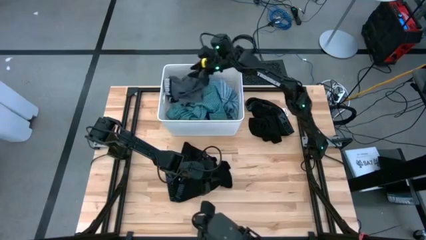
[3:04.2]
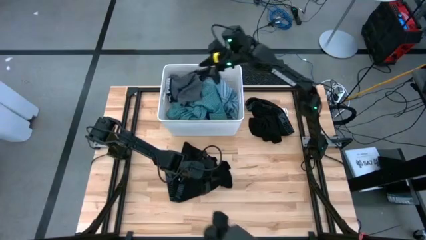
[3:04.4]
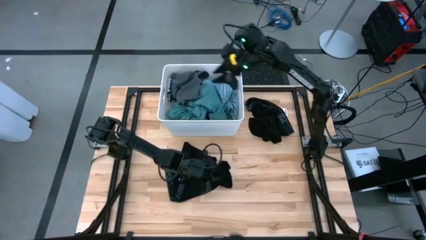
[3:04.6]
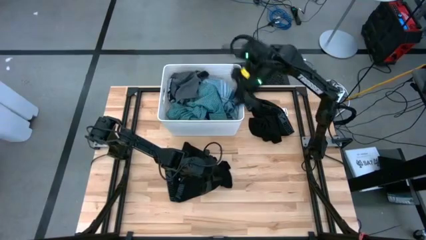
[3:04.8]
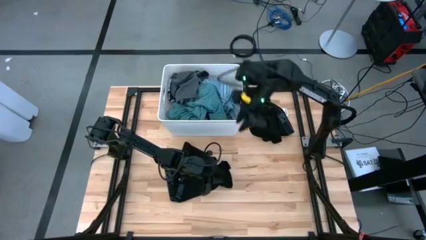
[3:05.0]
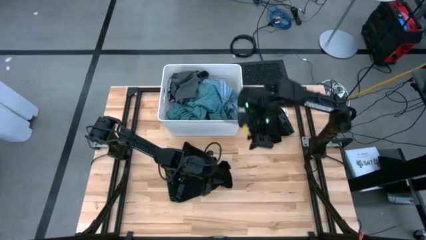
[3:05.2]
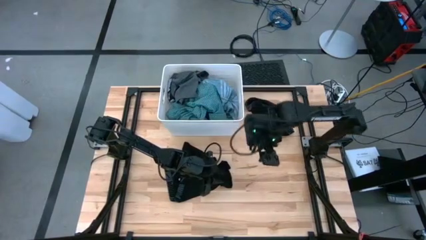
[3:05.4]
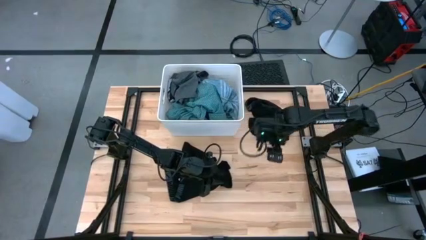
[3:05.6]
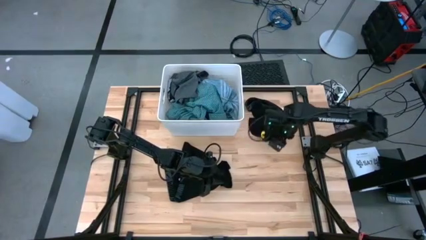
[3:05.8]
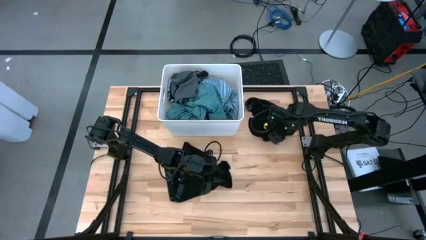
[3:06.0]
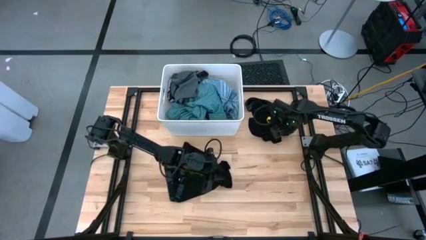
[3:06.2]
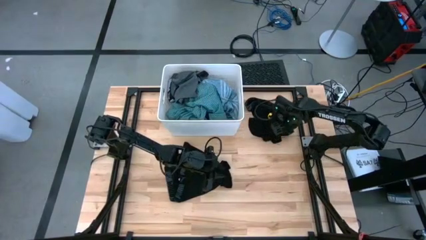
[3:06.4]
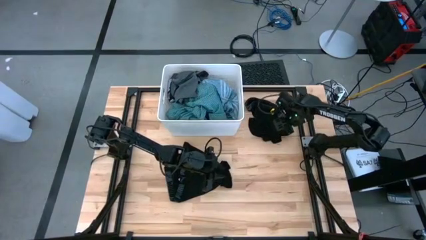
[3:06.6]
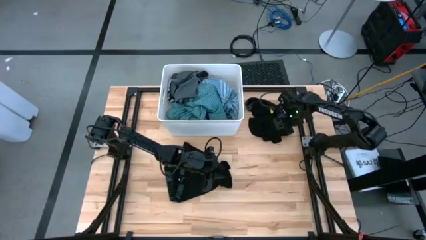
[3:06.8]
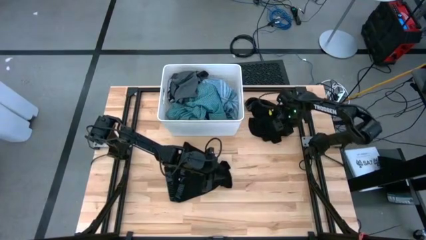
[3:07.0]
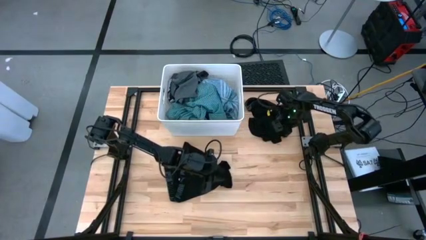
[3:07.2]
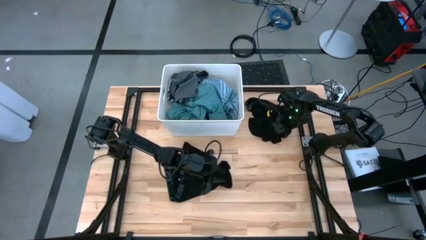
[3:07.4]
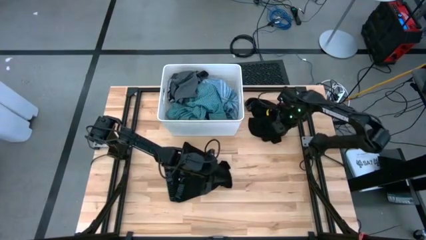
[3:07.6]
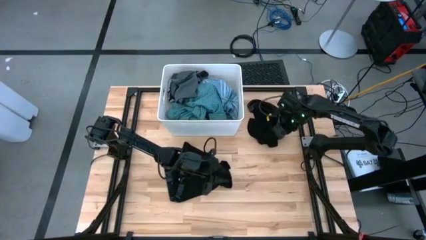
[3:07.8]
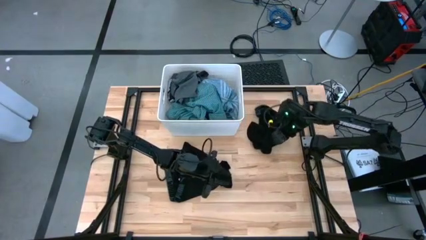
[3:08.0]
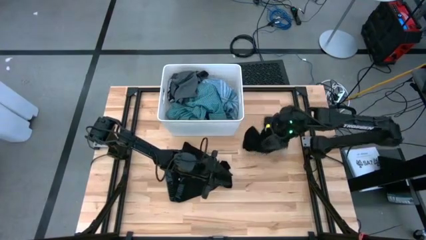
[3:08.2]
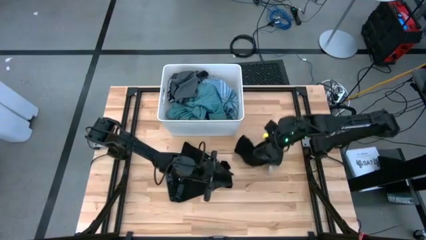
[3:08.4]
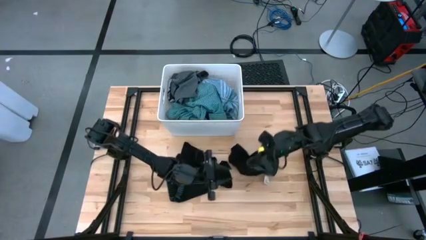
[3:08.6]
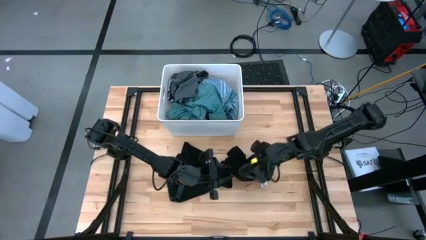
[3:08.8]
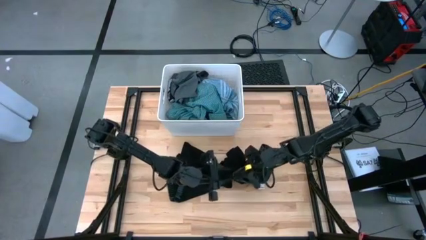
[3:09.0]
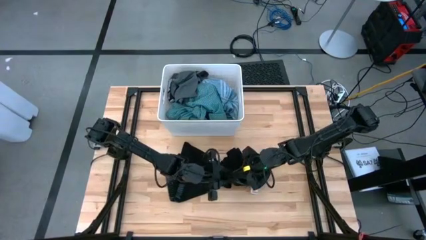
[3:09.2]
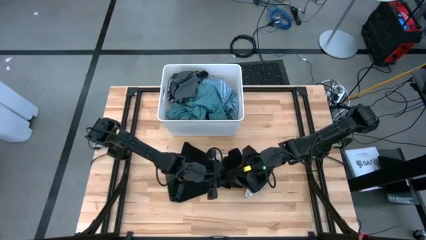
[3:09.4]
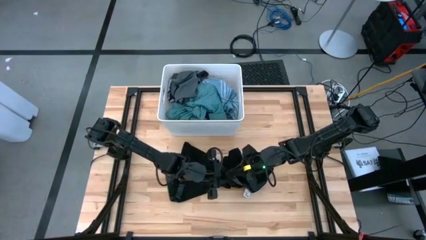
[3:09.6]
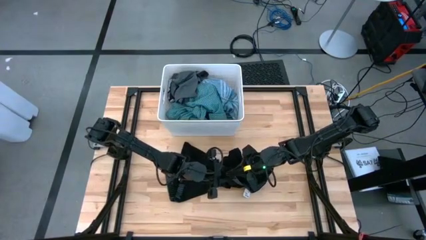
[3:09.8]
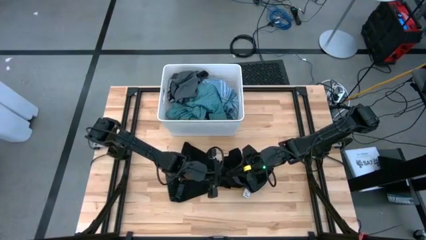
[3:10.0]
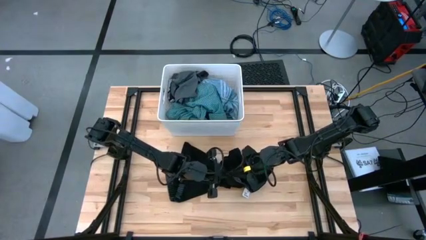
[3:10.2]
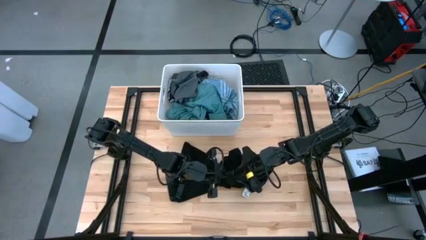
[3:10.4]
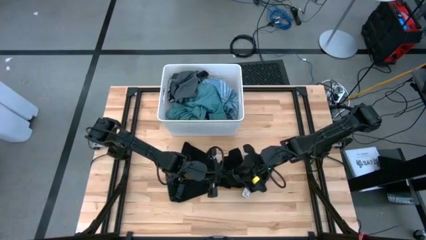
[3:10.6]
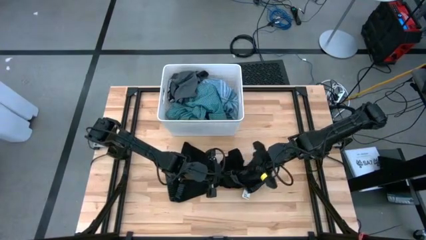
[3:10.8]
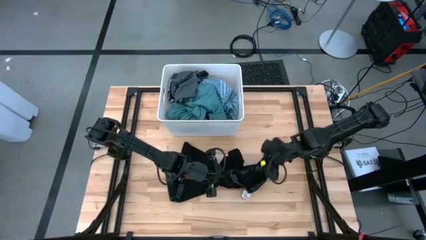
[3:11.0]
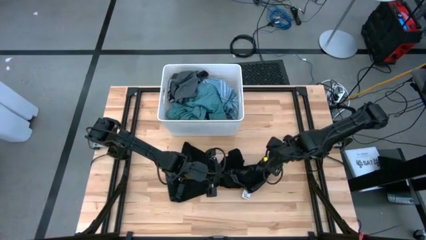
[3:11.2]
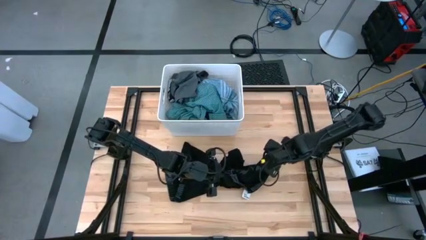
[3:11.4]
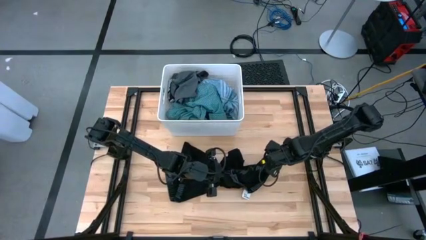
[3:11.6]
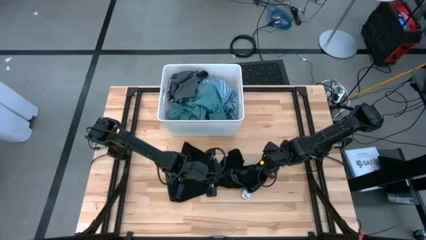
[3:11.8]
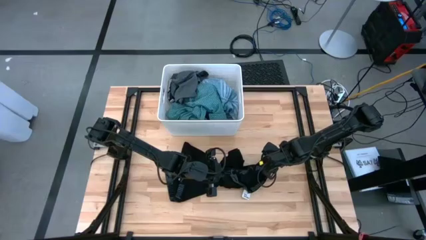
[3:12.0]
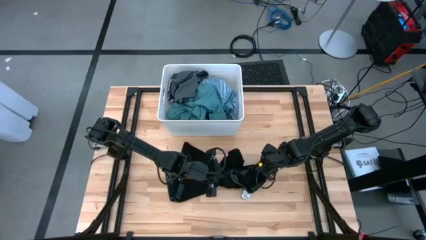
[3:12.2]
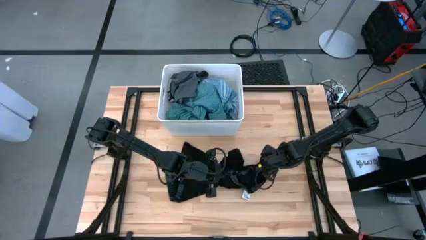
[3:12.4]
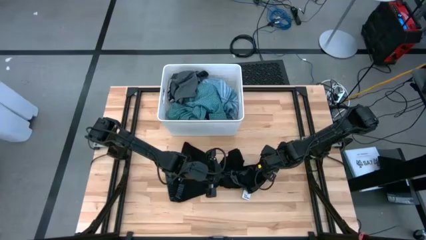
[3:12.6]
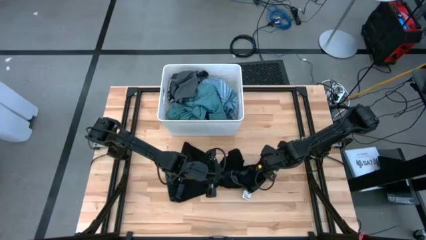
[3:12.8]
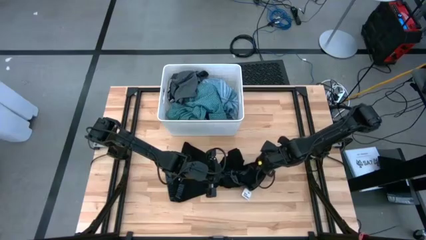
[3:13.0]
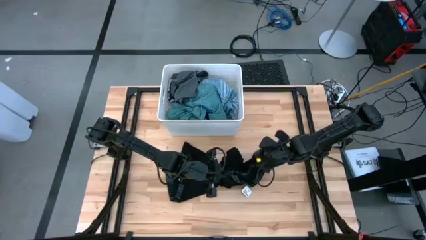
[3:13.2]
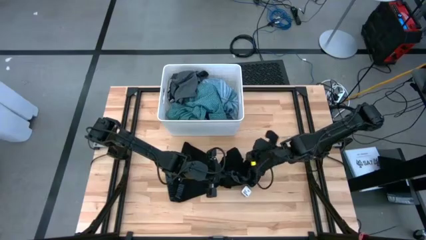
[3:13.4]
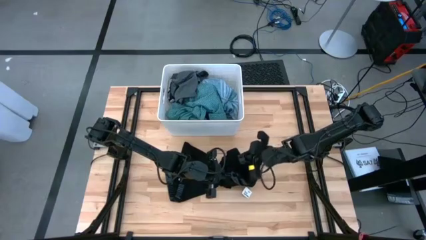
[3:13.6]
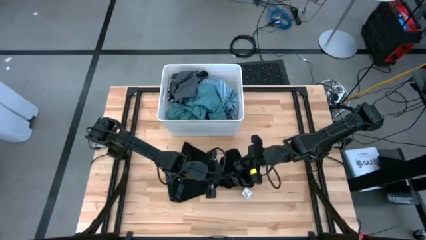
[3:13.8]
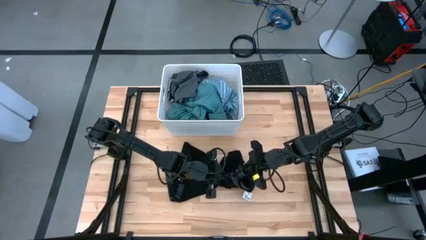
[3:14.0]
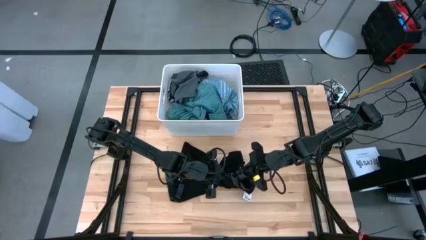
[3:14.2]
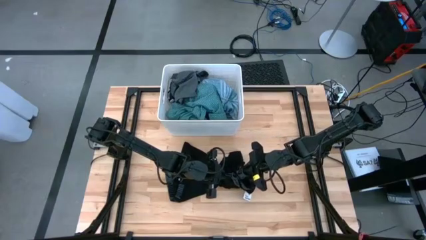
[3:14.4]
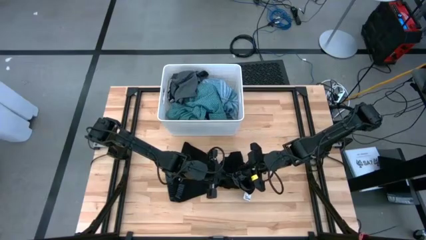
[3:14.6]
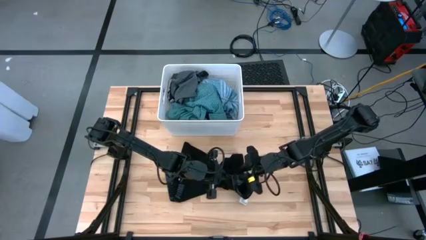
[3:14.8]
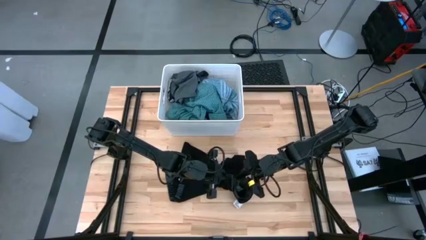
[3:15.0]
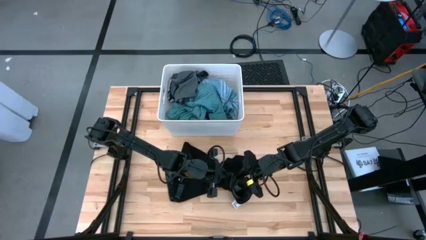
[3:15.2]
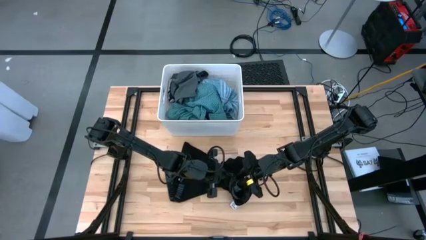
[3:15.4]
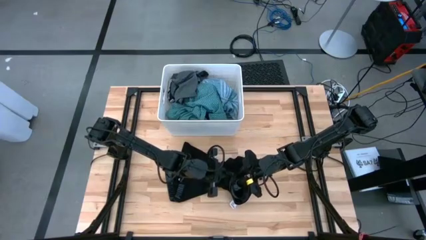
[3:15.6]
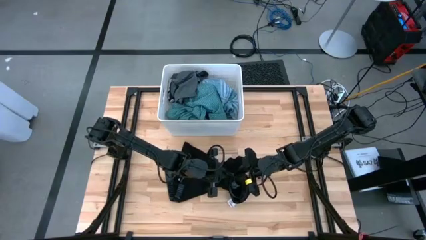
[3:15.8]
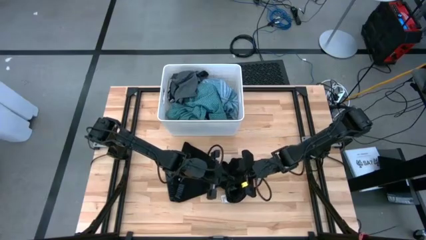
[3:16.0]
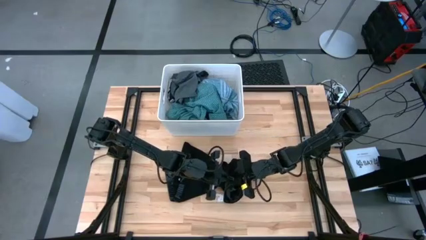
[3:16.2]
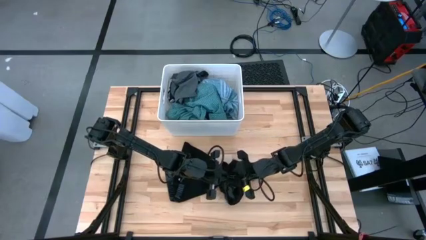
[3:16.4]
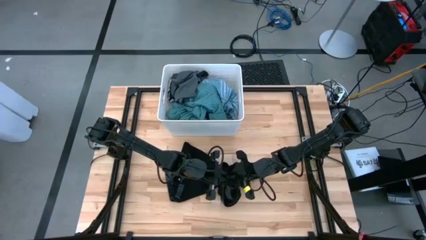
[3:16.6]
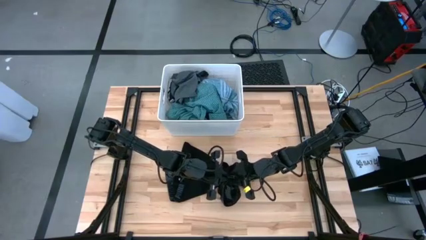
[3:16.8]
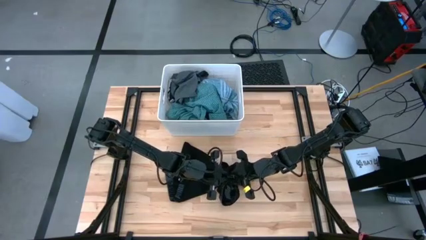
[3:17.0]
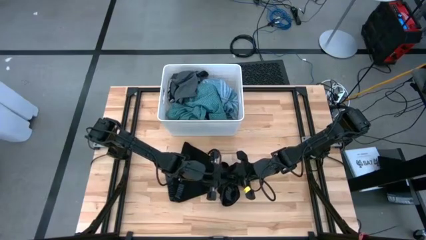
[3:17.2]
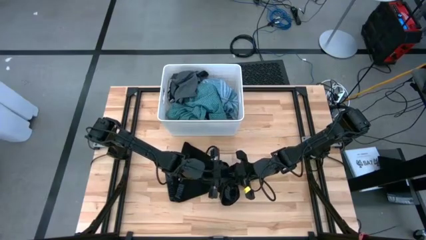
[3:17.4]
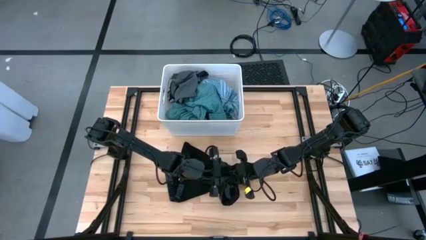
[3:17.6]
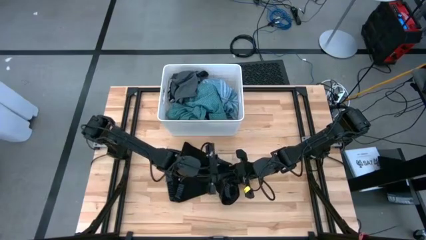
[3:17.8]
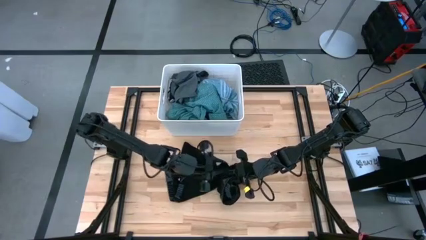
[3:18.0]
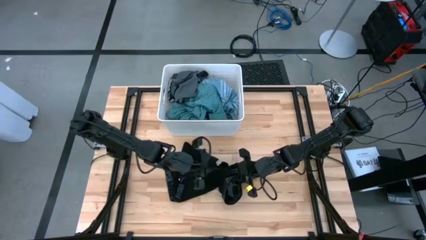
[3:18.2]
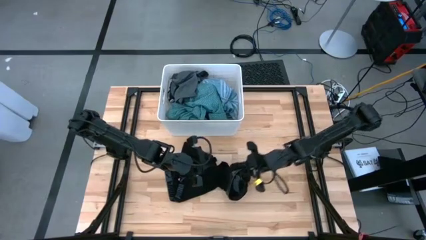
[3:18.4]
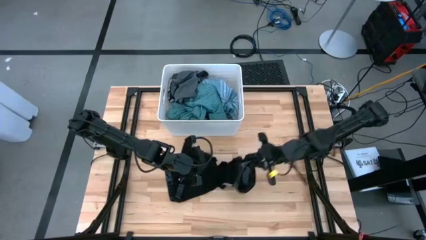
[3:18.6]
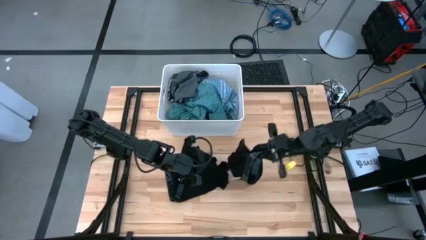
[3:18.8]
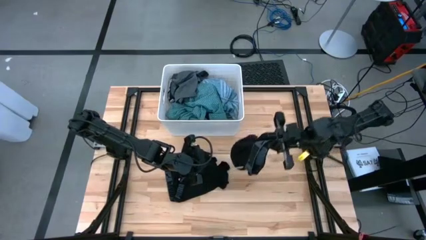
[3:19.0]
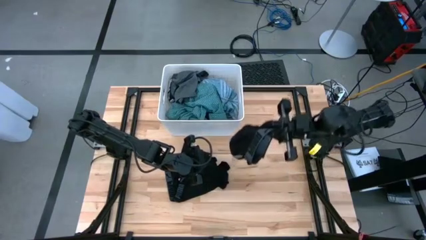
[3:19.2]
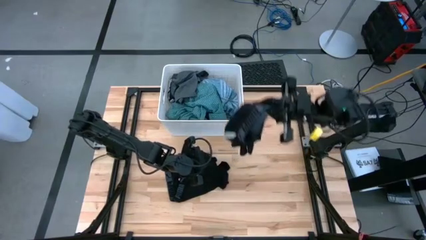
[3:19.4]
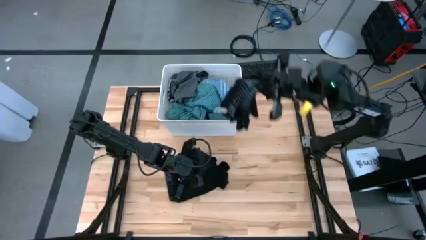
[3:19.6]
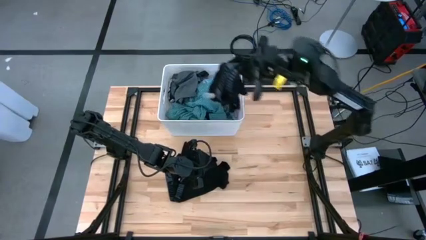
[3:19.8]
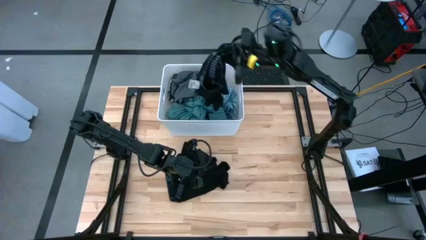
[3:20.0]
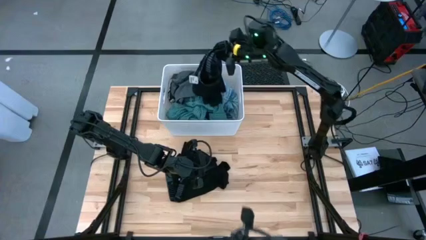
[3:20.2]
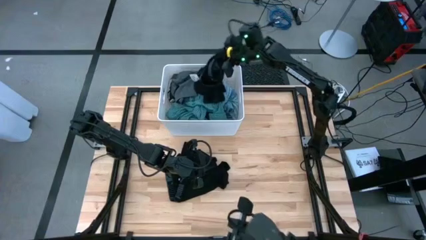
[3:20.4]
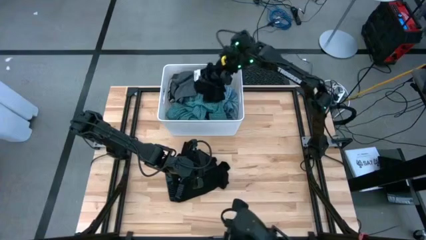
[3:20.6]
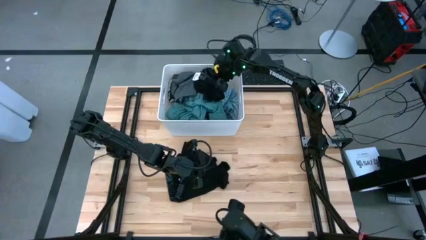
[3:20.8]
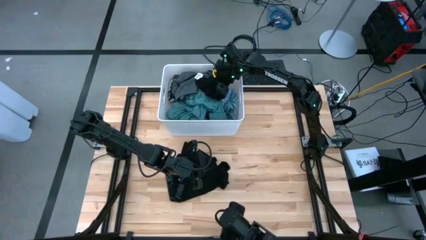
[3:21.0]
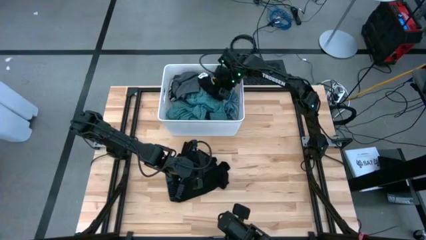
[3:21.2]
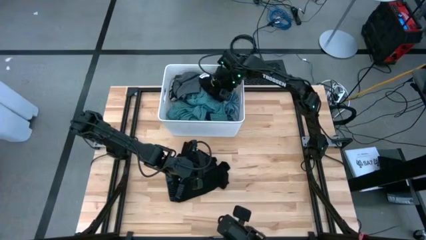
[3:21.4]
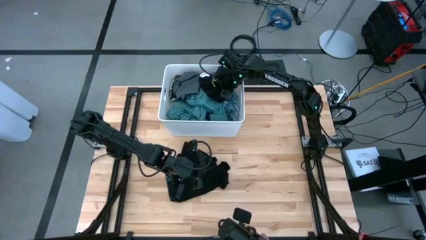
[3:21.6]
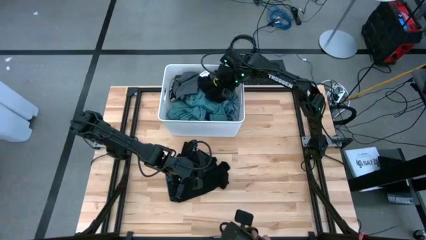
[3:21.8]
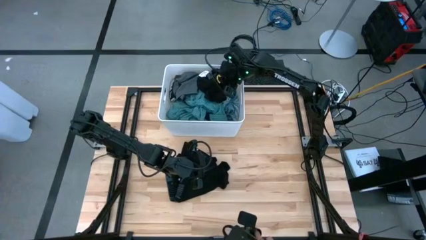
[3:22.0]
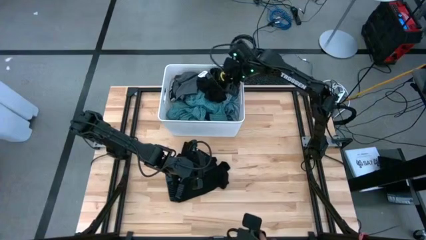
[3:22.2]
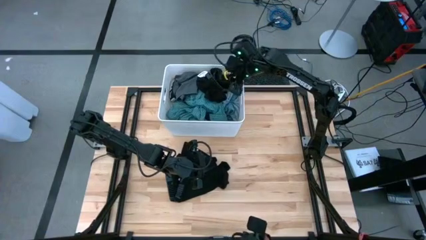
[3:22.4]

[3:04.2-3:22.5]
Task: Sort clothes
Put the top black underwear into the white bin
